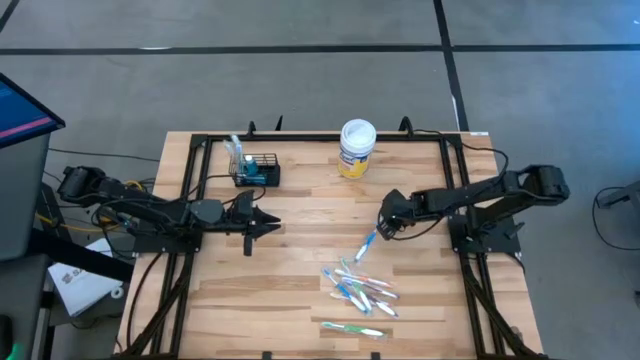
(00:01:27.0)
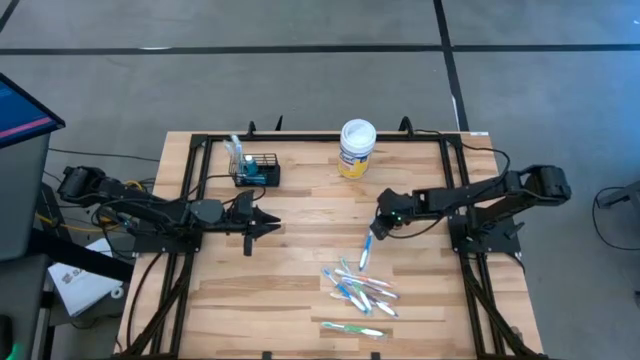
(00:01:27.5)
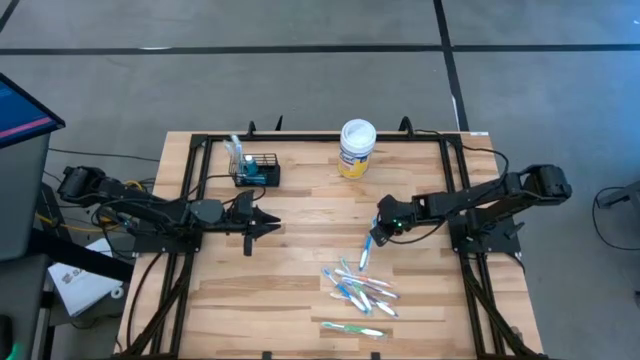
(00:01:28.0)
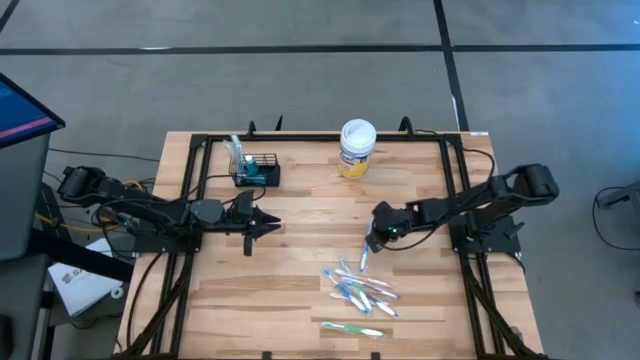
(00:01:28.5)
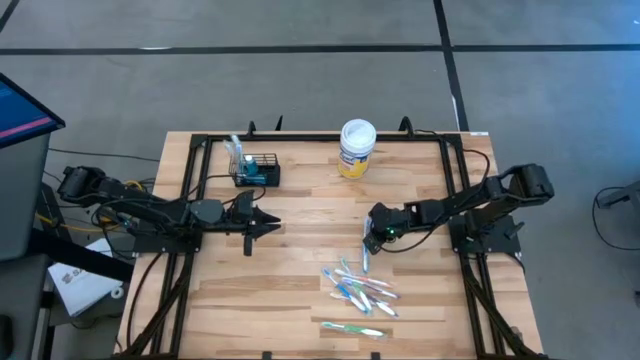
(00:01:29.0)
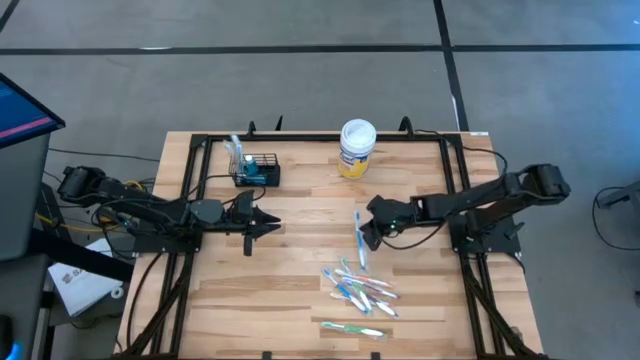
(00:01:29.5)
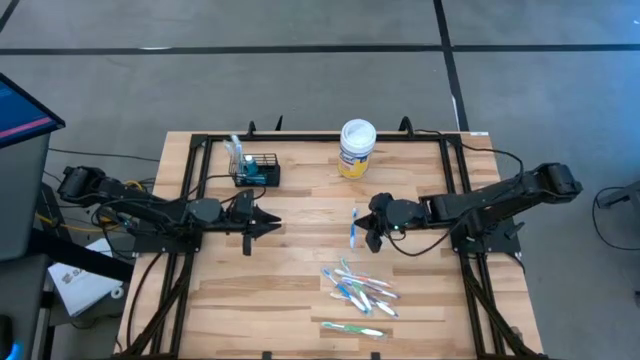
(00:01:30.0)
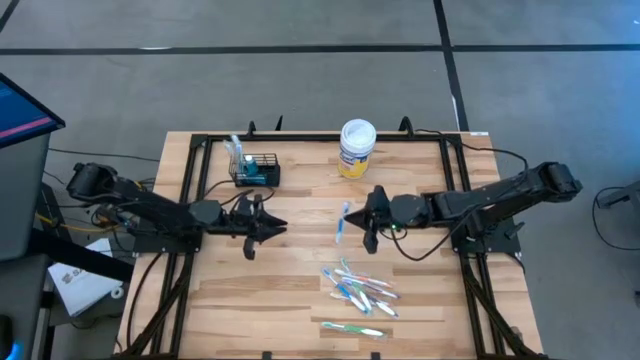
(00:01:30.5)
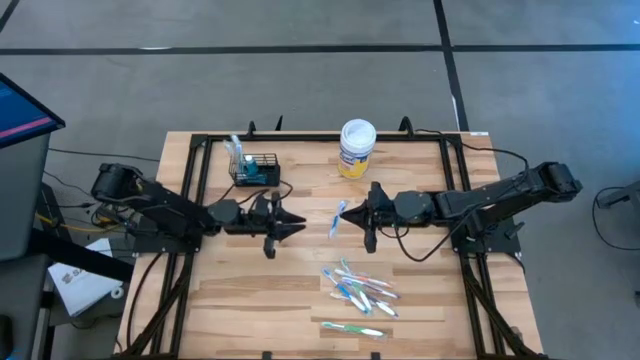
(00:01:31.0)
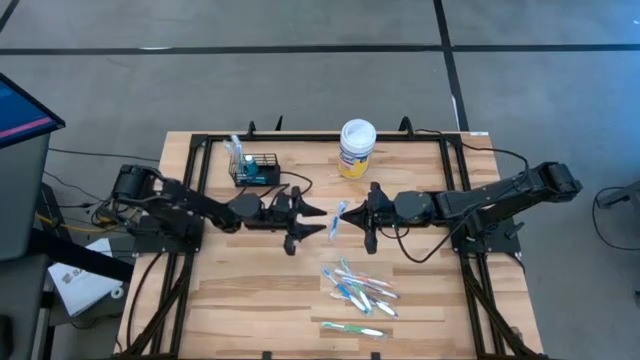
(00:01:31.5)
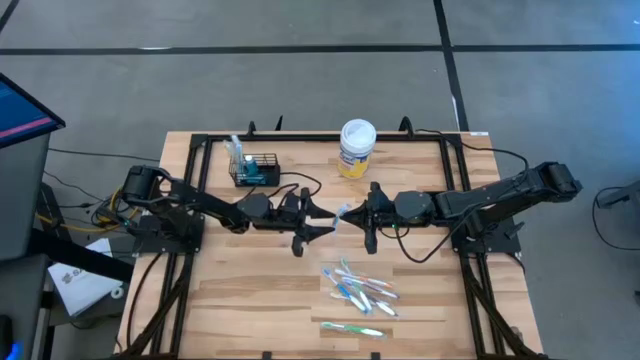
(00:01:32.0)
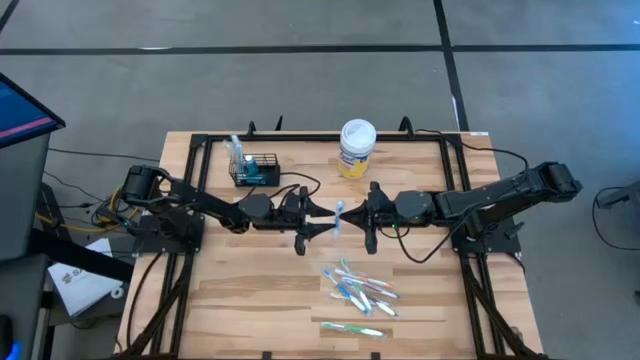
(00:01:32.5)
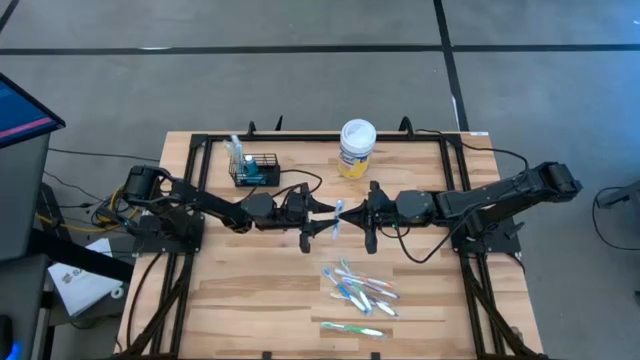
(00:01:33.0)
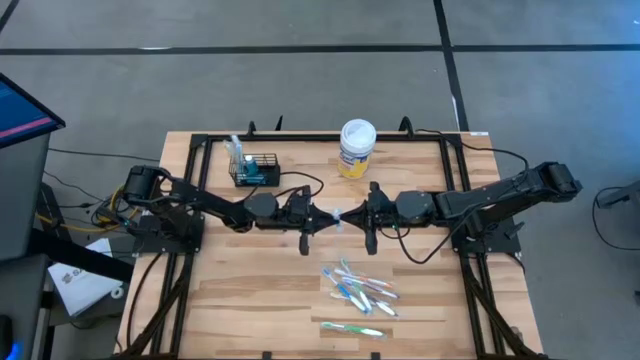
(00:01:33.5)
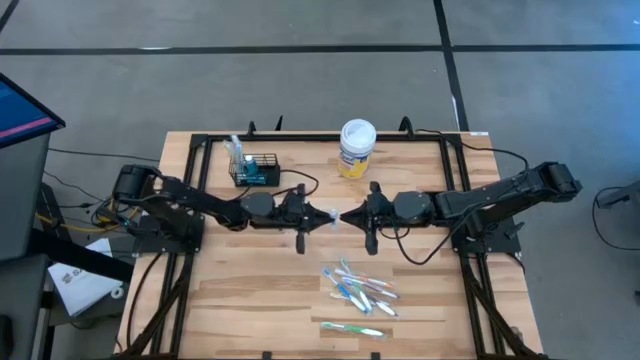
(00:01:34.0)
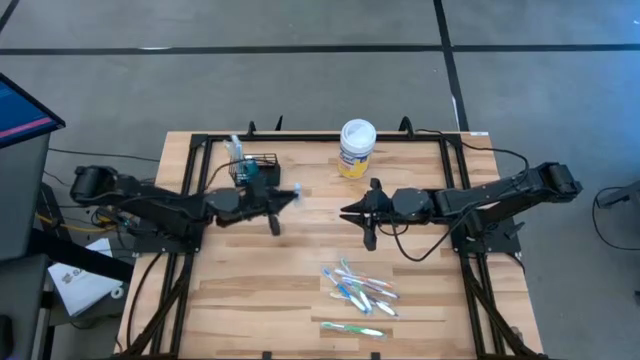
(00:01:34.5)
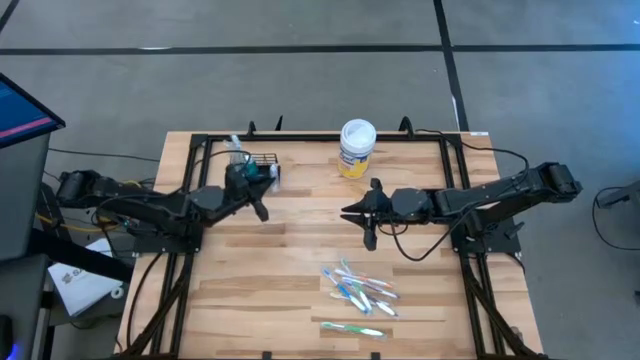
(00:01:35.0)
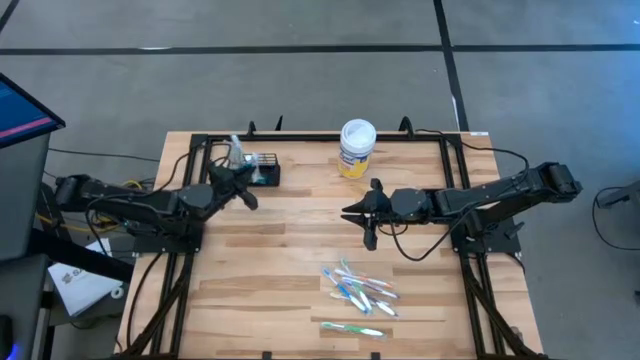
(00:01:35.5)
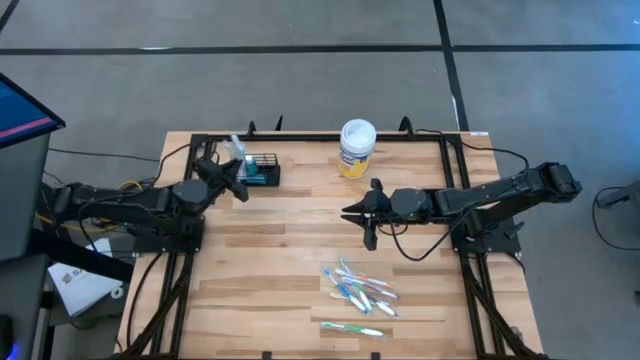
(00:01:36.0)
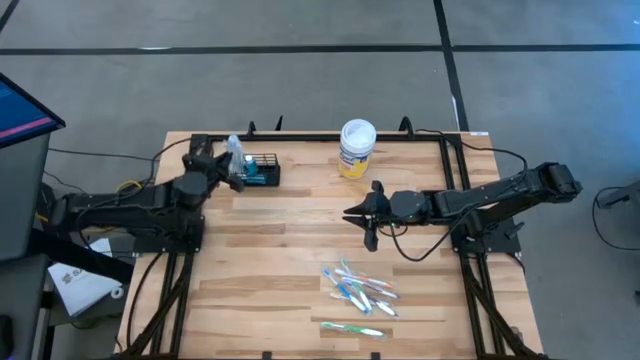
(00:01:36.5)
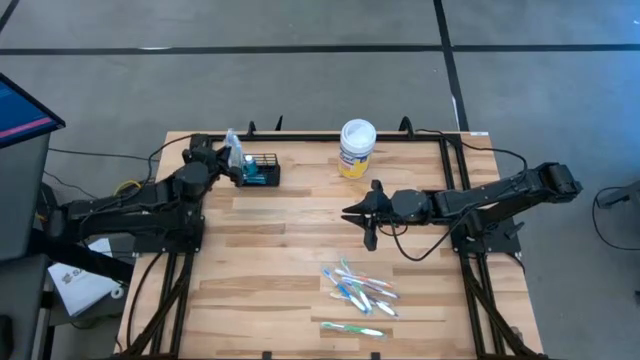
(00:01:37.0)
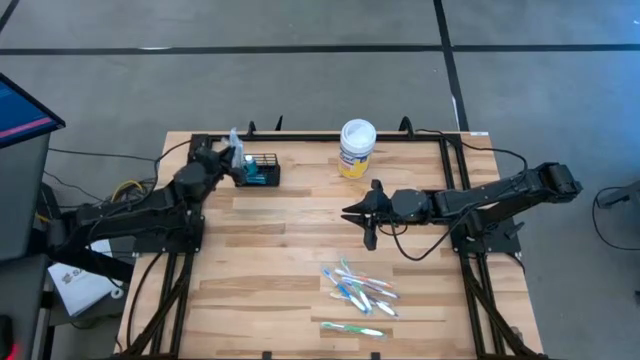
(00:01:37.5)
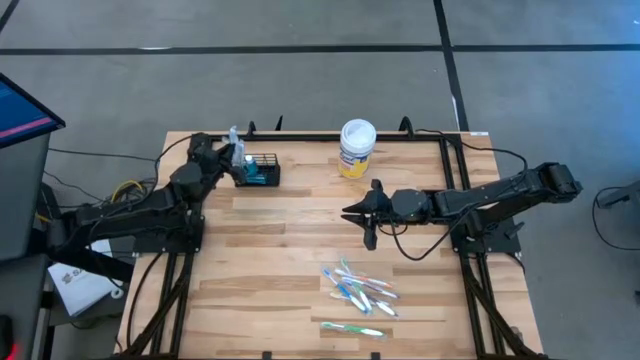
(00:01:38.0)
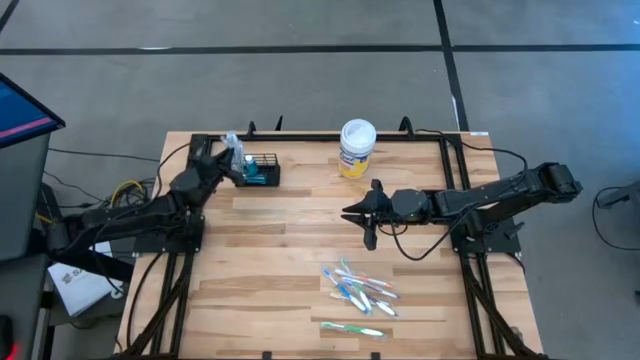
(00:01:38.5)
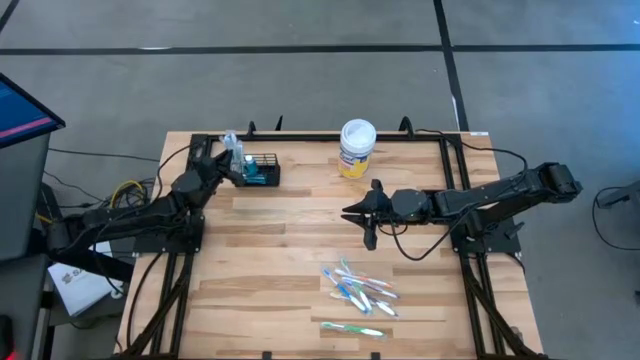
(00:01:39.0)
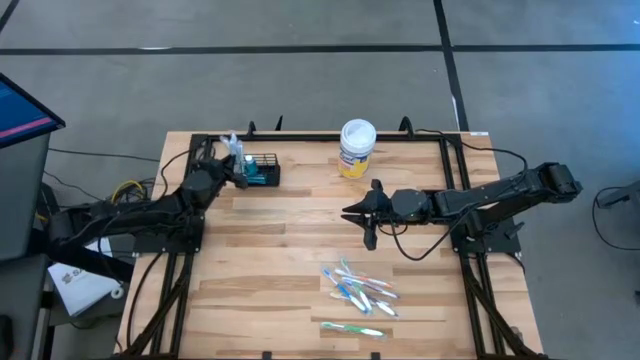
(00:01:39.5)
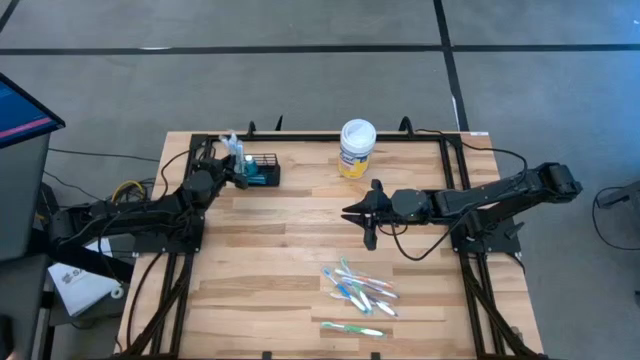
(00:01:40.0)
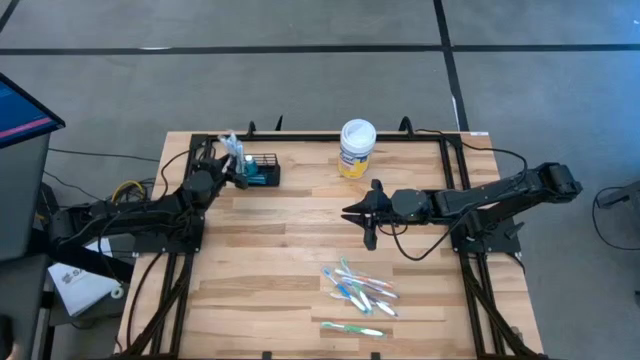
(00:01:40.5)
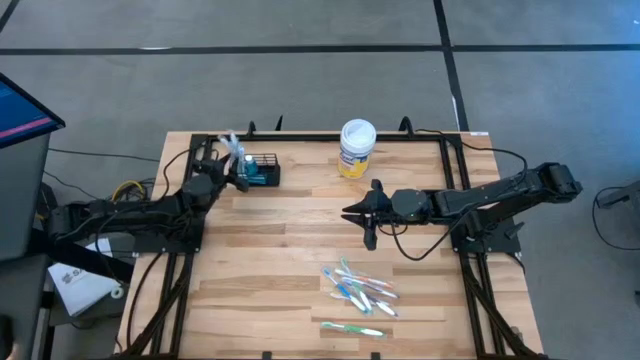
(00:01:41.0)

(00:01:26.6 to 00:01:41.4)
Task: Pick & Place toothbrushing station
Put the top blue toothbrush into the mesh organizer

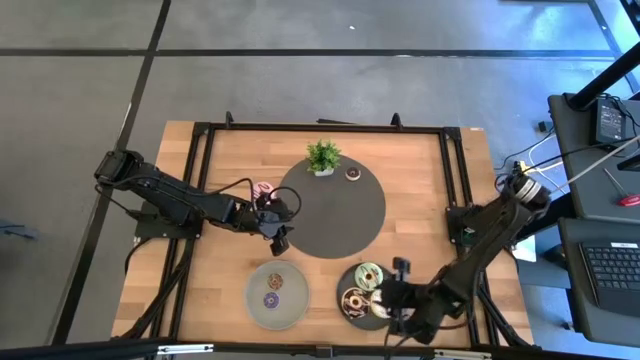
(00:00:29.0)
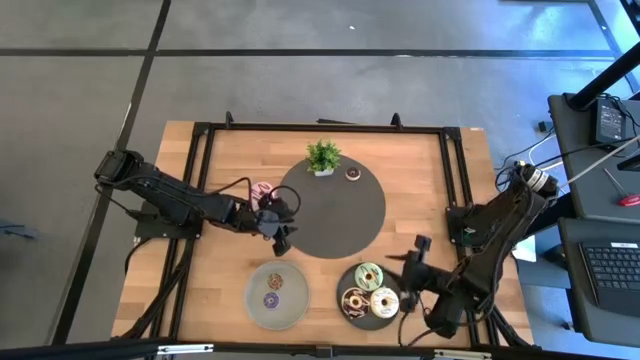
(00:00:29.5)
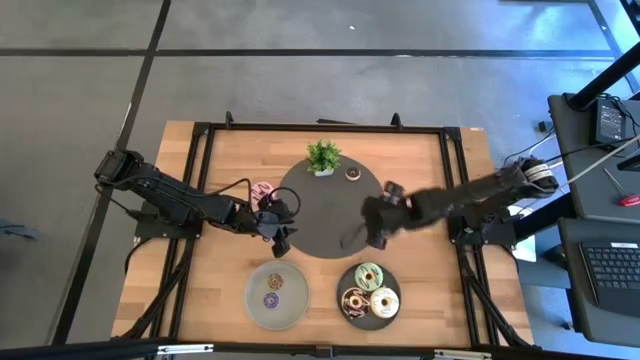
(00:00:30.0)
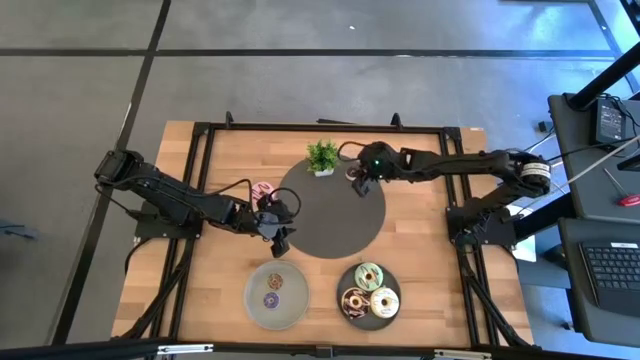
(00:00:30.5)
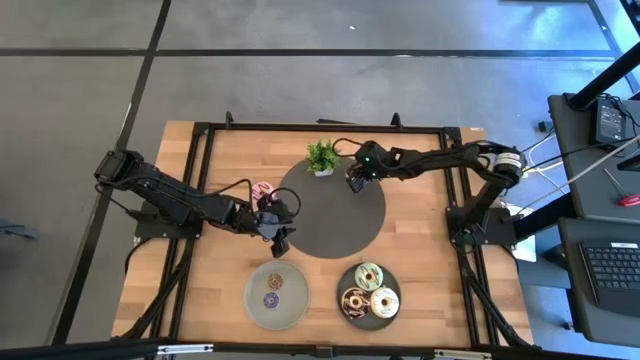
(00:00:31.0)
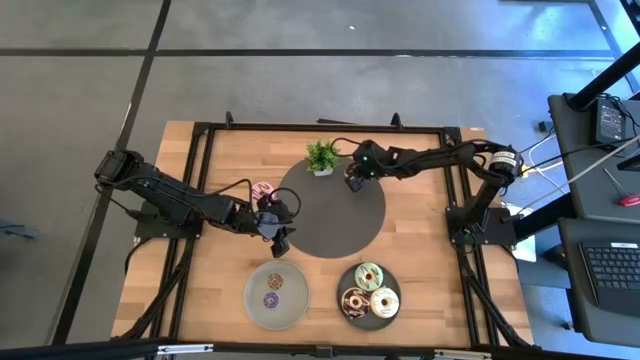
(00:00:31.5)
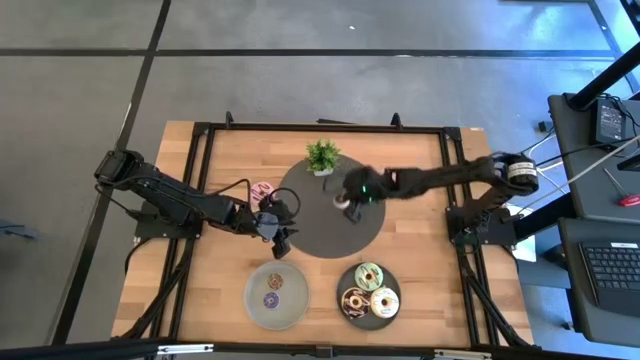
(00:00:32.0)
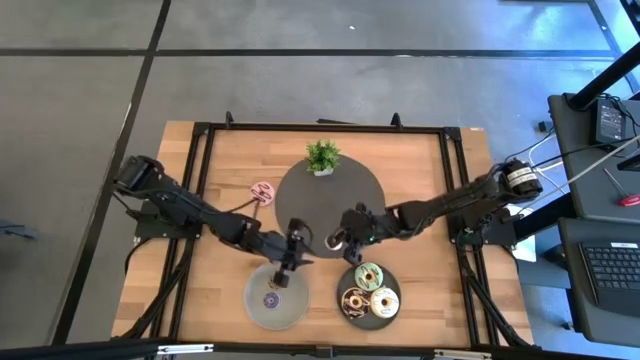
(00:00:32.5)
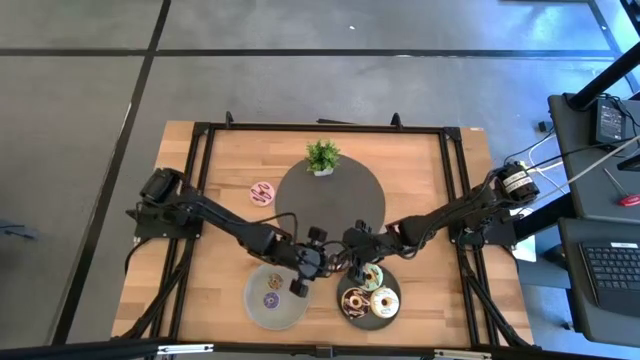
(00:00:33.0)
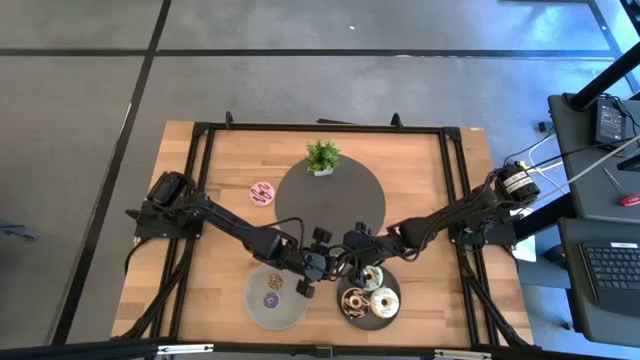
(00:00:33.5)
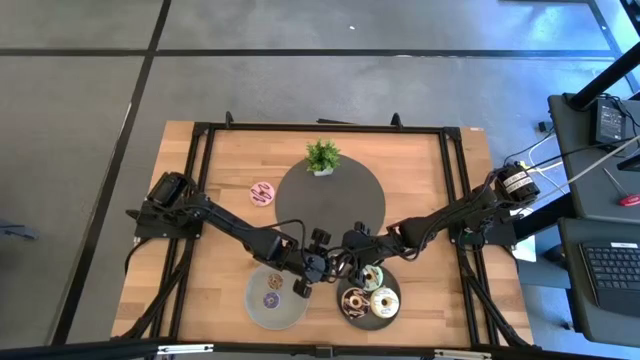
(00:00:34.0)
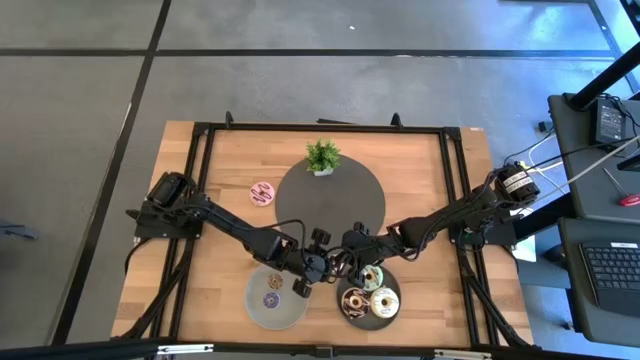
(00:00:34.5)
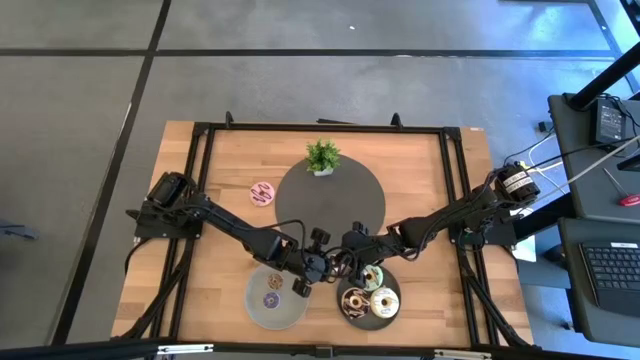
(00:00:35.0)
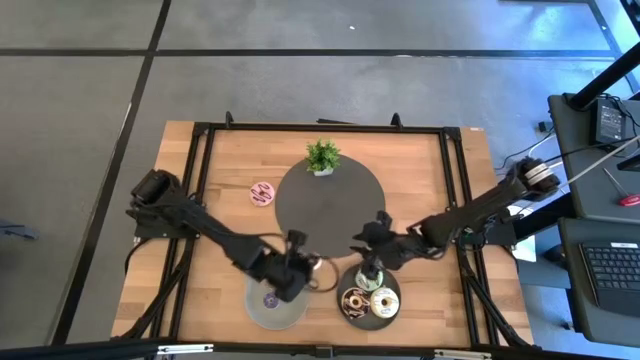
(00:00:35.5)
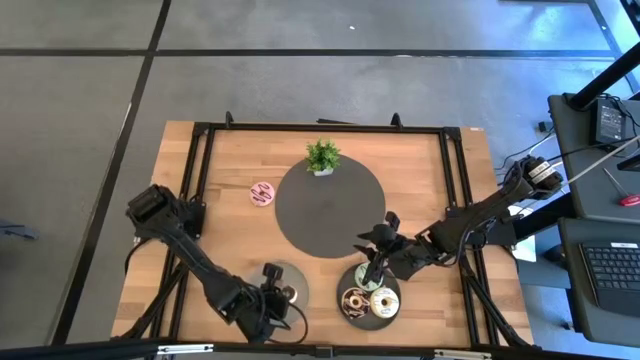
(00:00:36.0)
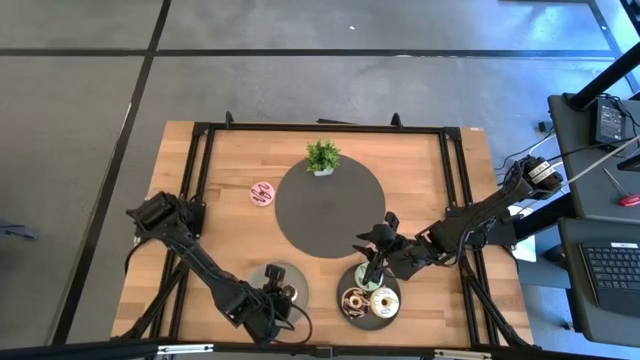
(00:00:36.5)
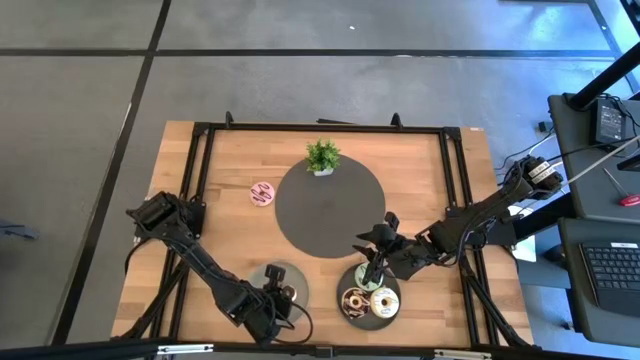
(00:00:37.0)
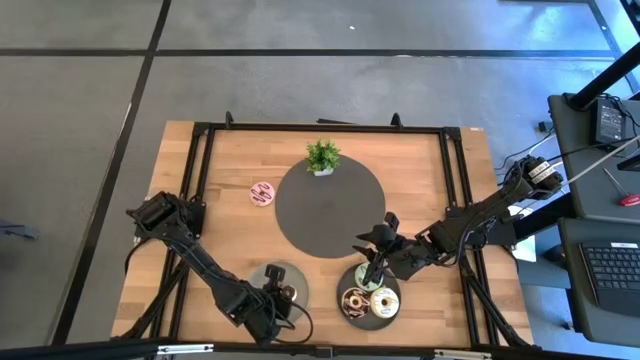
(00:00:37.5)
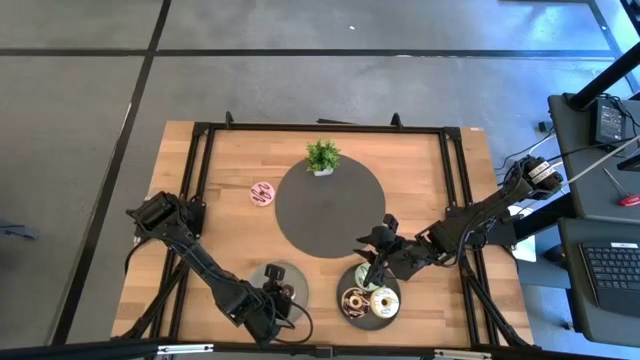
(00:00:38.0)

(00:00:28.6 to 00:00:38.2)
Task: Pick & Place donuts
Put the small dark brown donut on the gray plate
